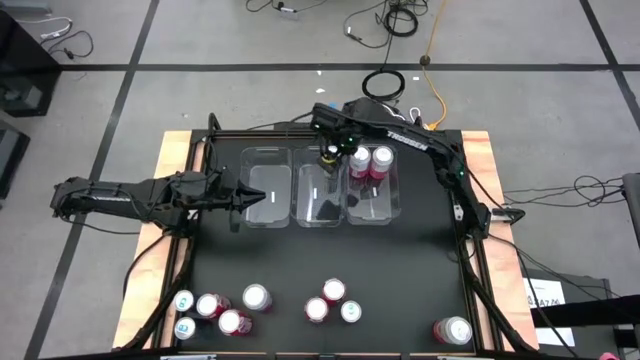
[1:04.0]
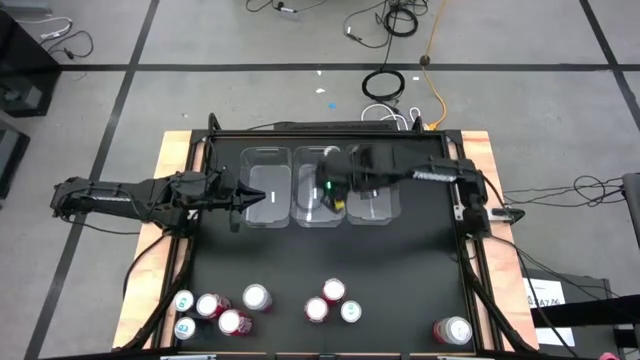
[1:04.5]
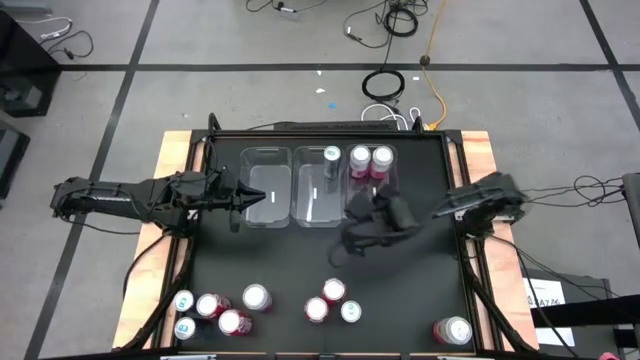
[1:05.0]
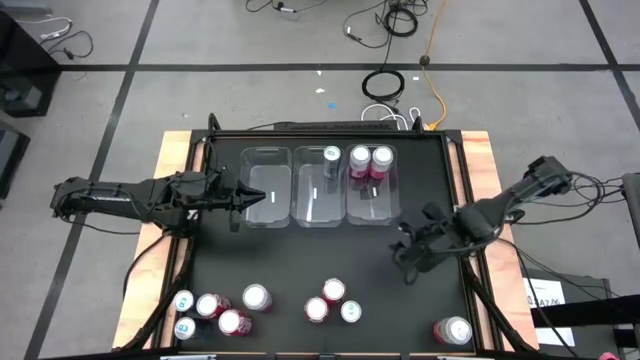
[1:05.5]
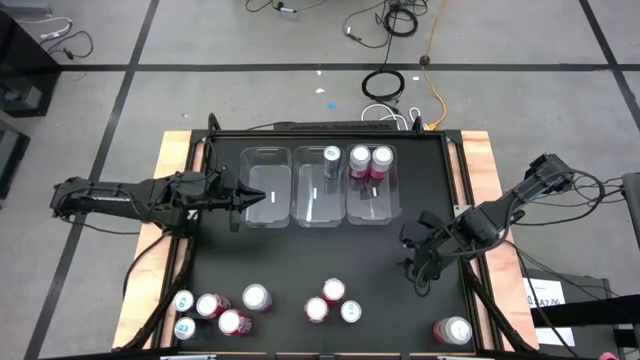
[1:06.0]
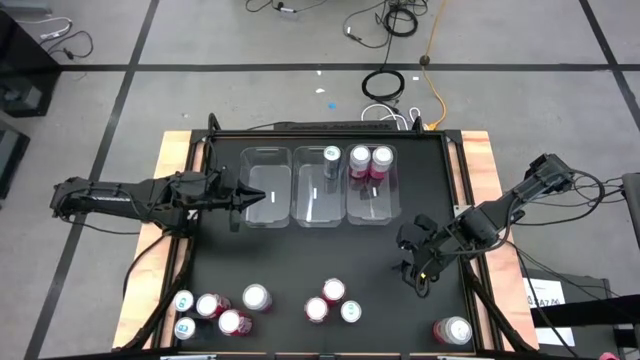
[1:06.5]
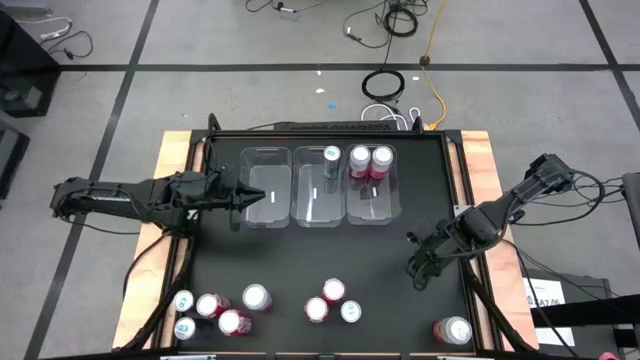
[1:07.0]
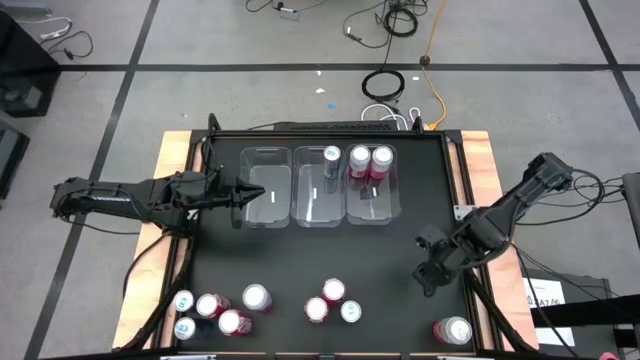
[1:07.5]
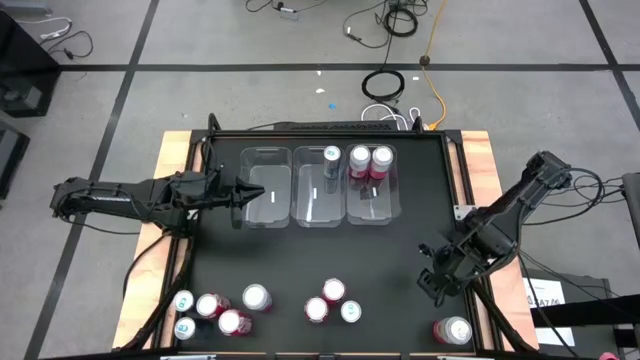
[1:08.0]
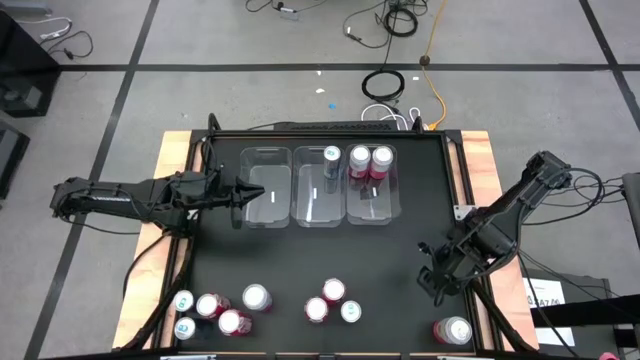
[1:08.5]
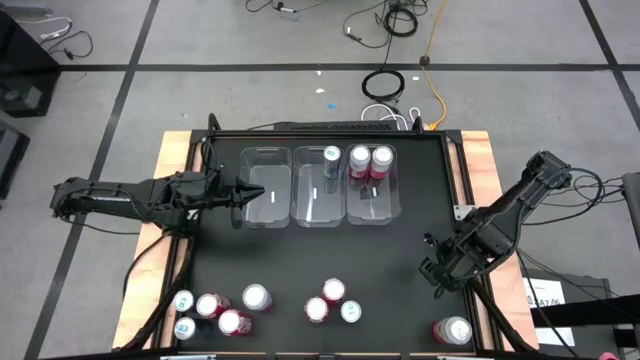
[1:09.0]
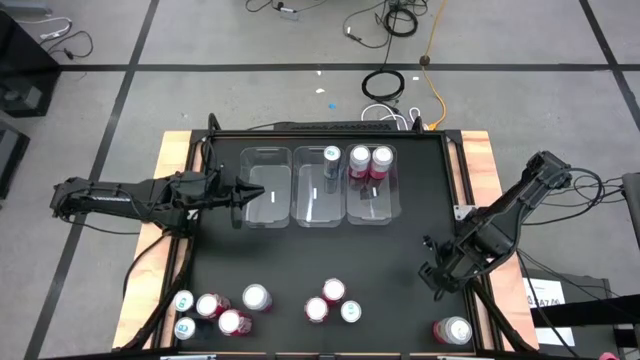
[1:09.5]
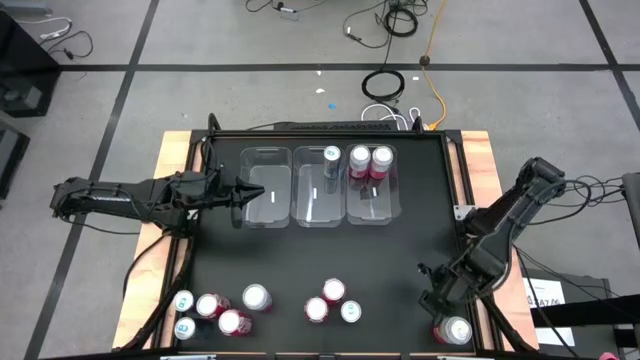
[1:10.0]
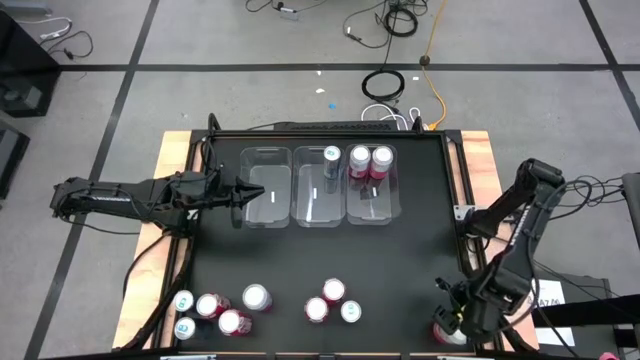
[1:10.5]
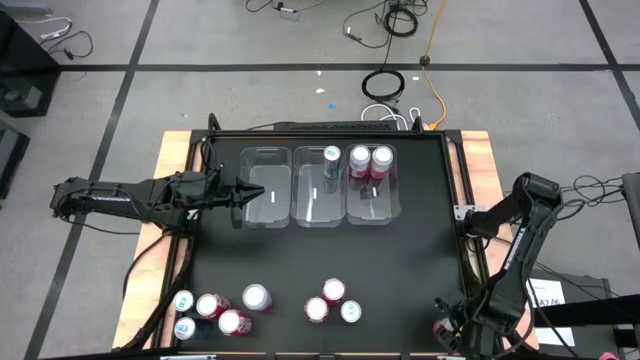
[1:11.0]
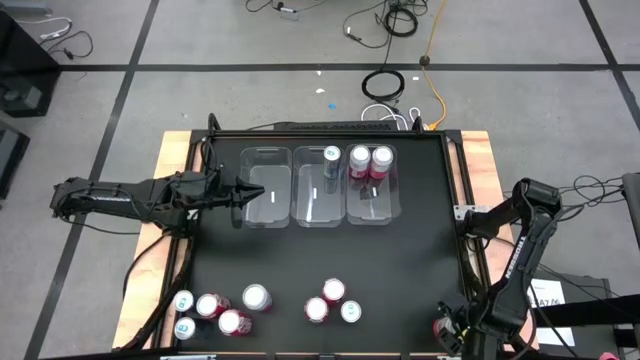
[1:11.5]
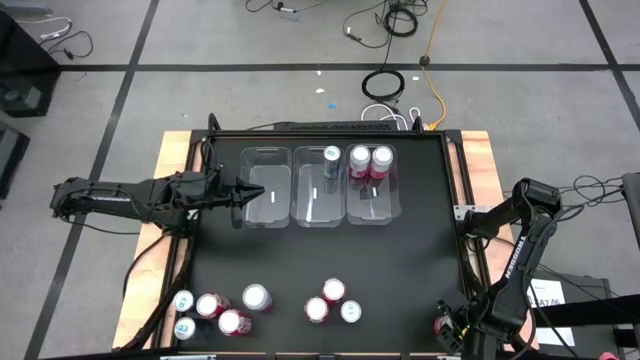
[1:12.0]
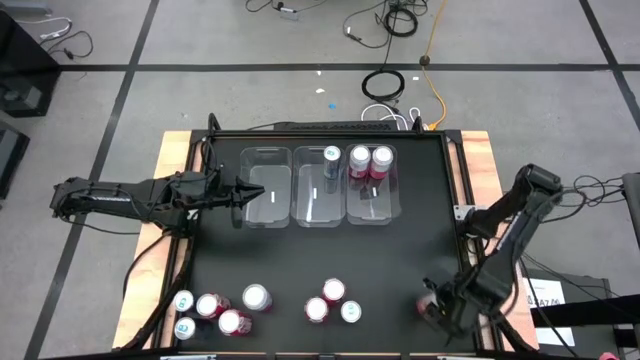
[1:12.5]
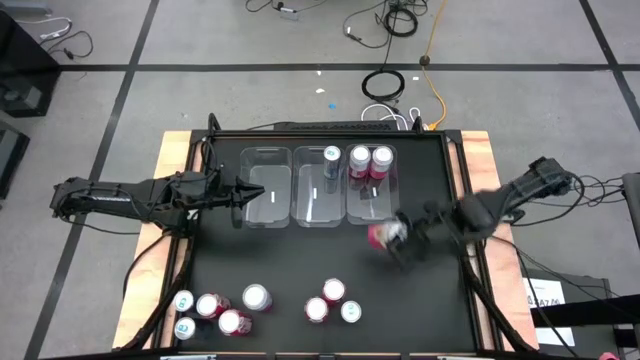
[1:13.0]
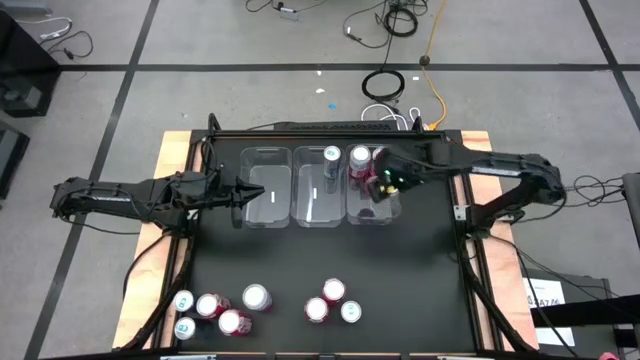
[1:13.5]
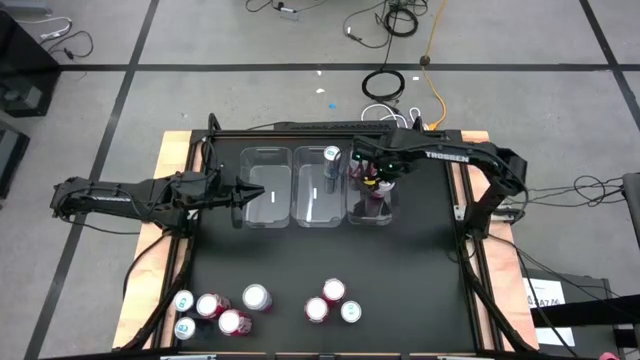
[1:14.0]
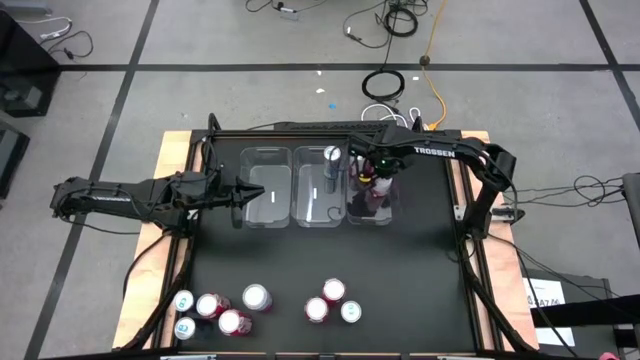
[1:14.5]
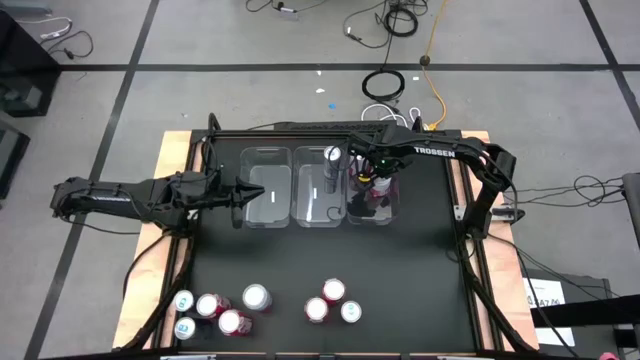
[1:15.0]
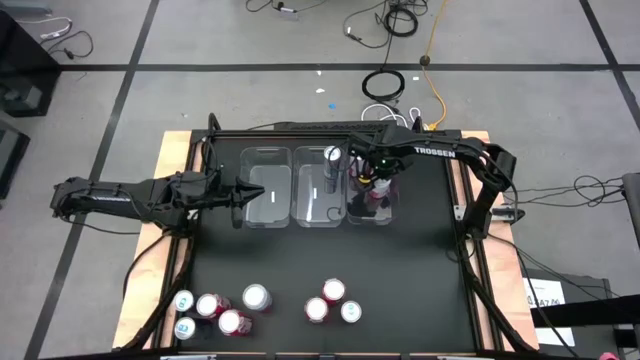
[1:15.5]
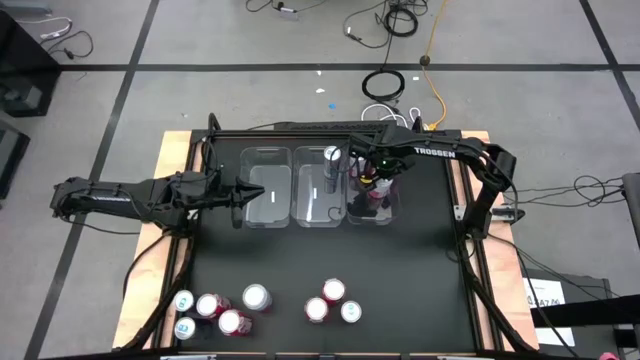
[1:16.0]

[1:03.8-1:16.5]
Task: Sort soda cans
Put the pink-white soda can into the right transparent bin
